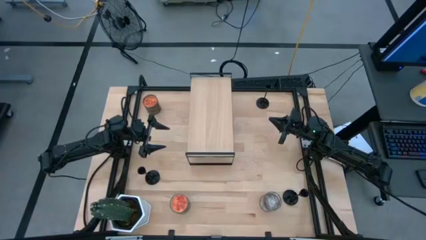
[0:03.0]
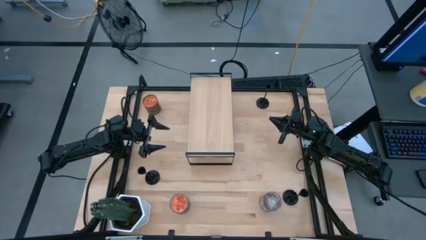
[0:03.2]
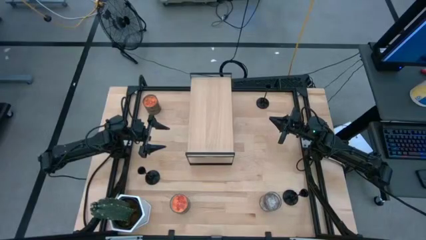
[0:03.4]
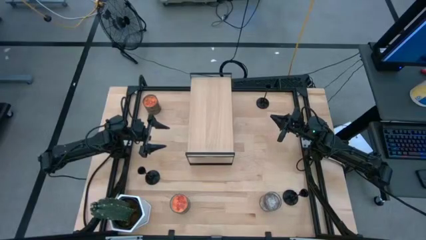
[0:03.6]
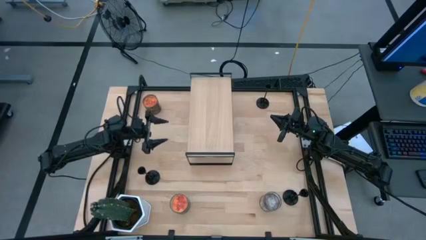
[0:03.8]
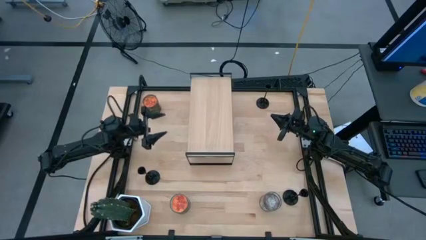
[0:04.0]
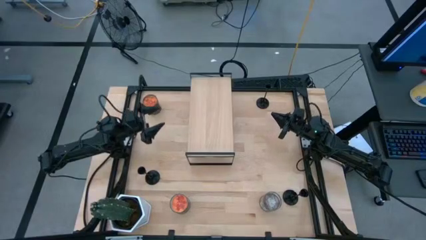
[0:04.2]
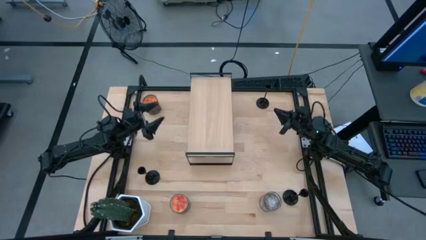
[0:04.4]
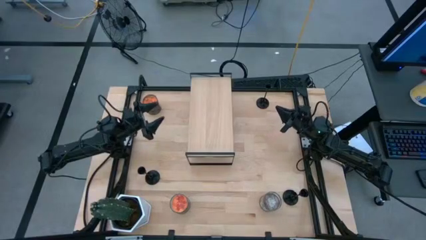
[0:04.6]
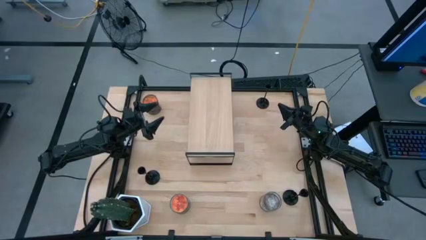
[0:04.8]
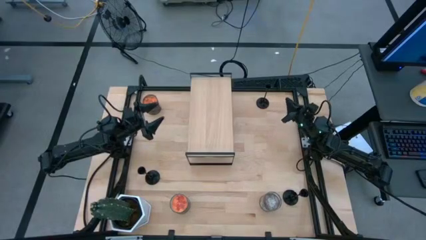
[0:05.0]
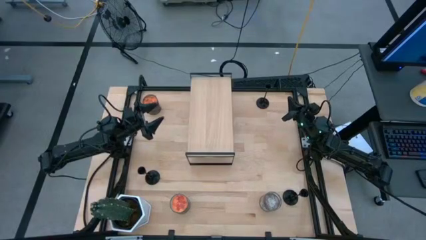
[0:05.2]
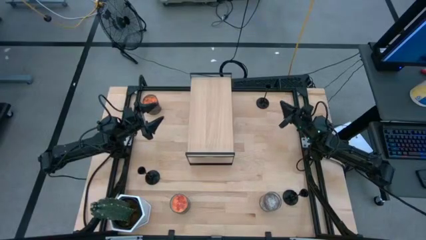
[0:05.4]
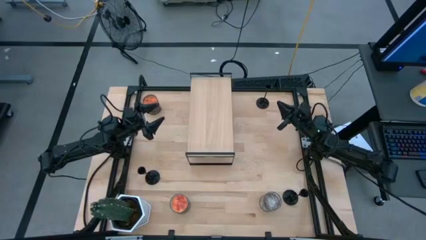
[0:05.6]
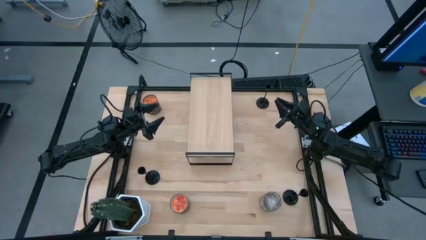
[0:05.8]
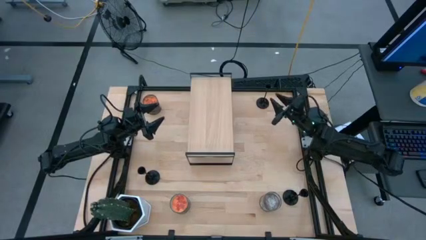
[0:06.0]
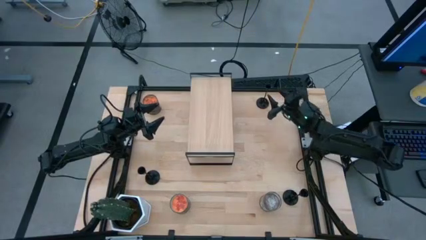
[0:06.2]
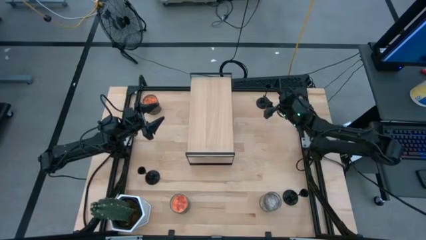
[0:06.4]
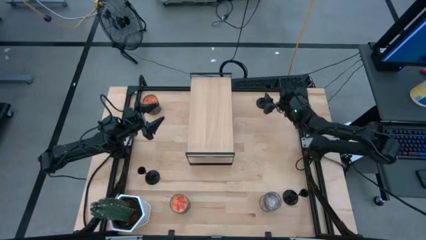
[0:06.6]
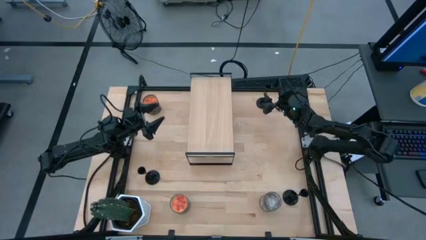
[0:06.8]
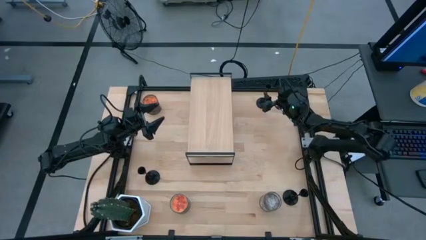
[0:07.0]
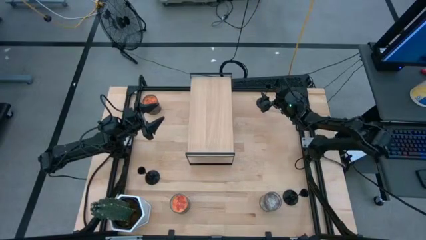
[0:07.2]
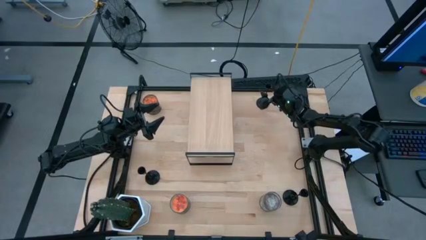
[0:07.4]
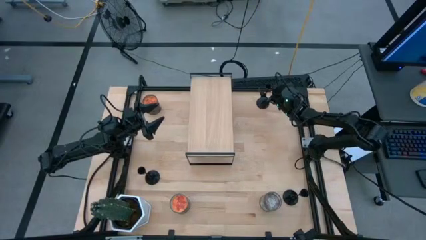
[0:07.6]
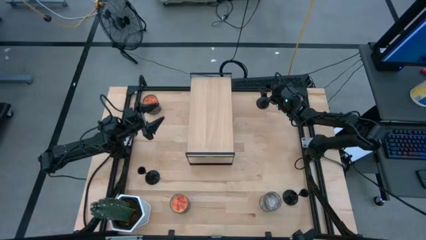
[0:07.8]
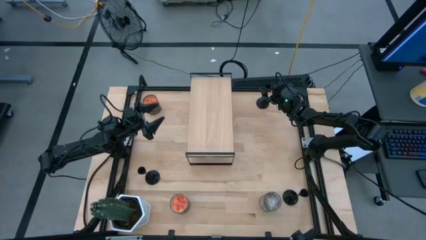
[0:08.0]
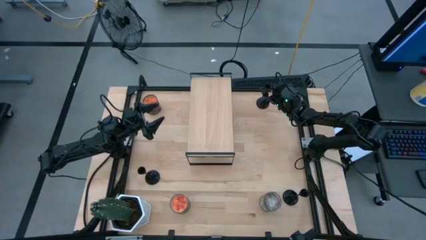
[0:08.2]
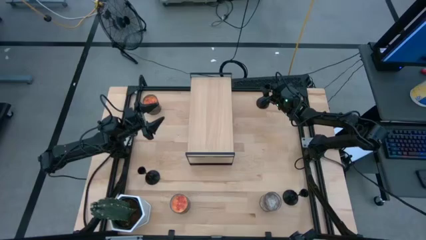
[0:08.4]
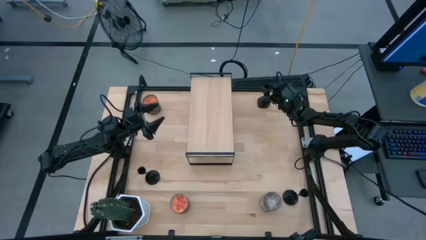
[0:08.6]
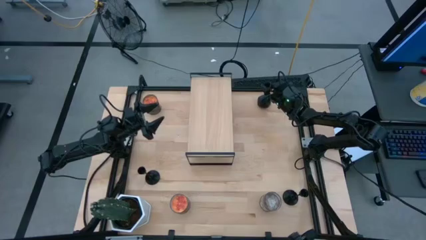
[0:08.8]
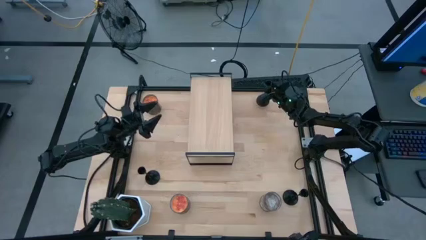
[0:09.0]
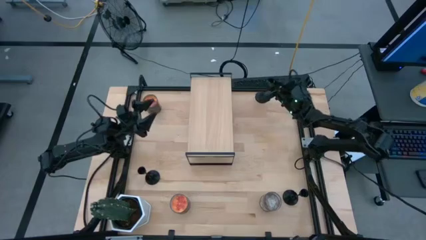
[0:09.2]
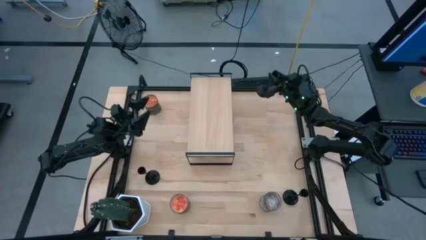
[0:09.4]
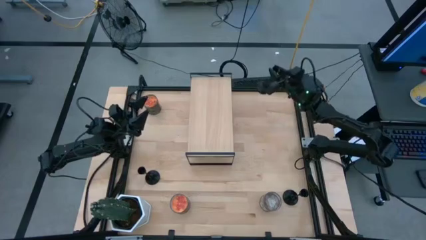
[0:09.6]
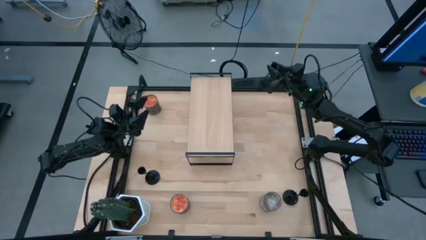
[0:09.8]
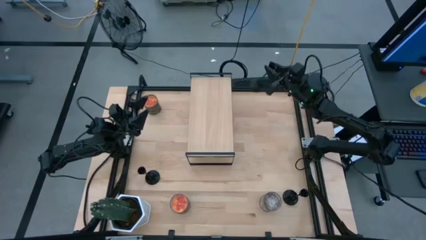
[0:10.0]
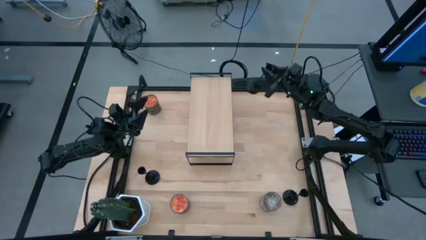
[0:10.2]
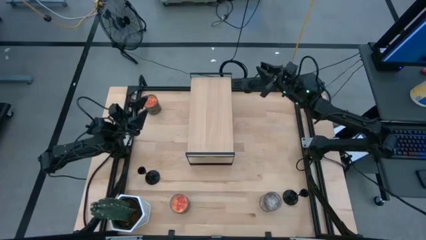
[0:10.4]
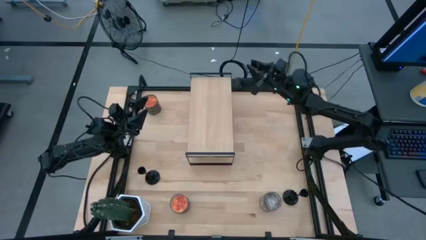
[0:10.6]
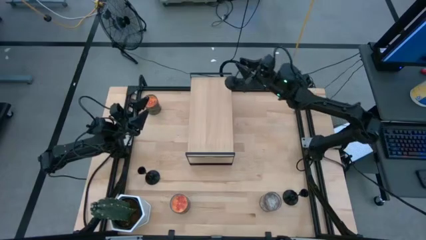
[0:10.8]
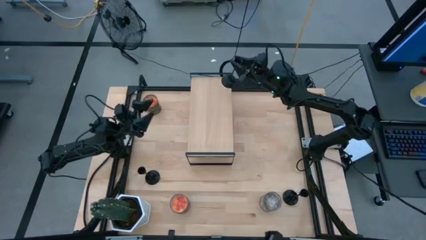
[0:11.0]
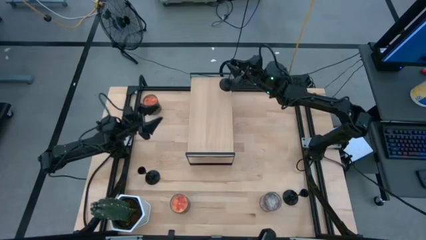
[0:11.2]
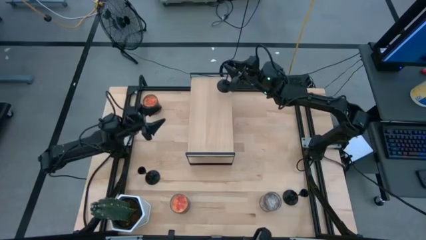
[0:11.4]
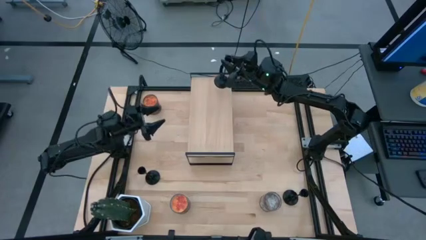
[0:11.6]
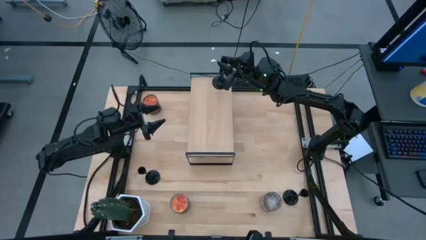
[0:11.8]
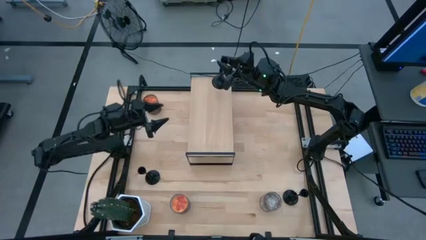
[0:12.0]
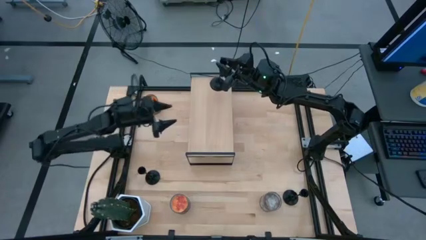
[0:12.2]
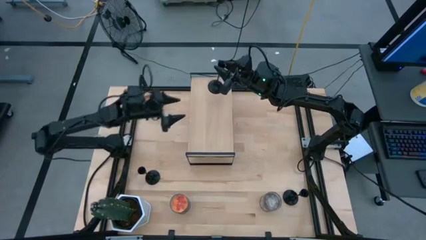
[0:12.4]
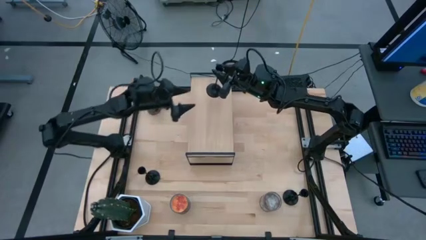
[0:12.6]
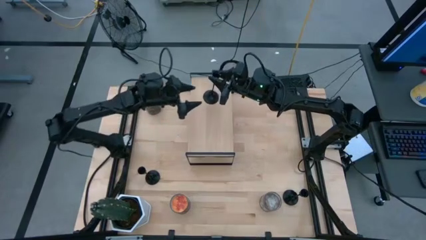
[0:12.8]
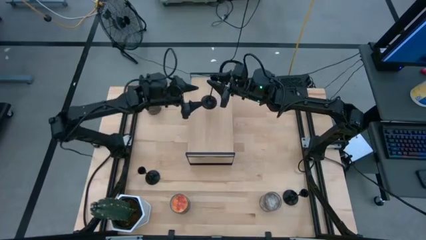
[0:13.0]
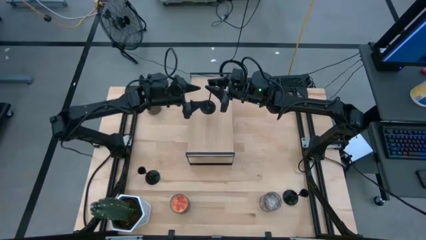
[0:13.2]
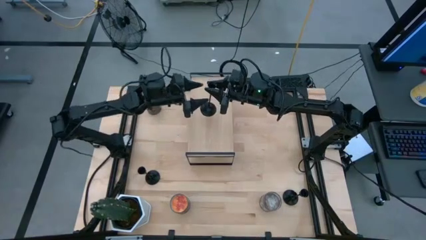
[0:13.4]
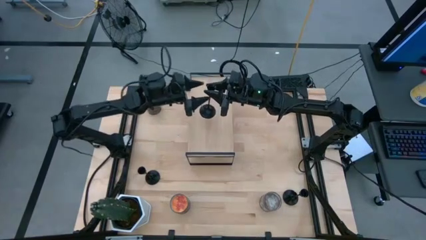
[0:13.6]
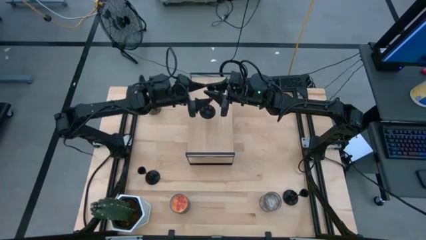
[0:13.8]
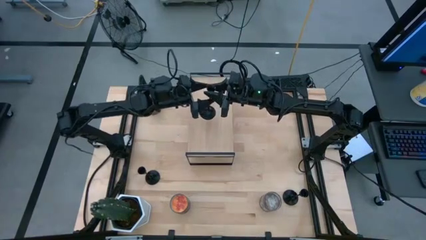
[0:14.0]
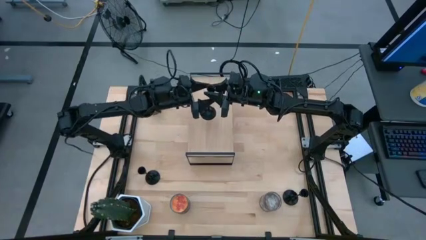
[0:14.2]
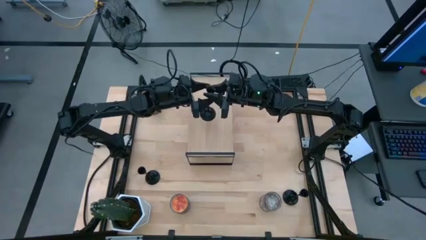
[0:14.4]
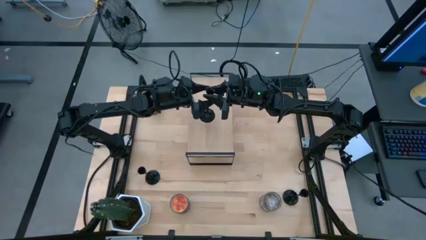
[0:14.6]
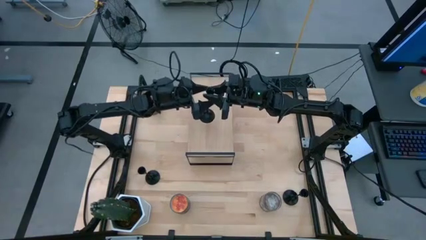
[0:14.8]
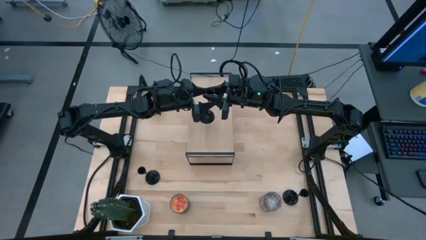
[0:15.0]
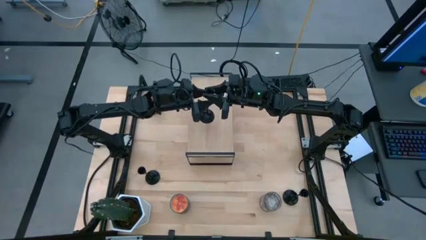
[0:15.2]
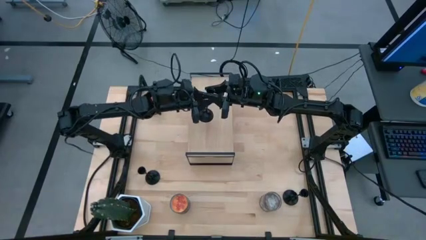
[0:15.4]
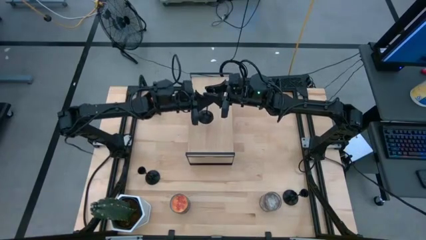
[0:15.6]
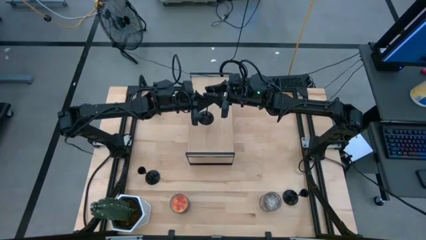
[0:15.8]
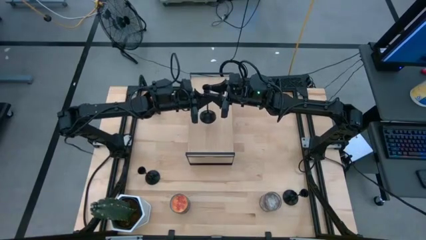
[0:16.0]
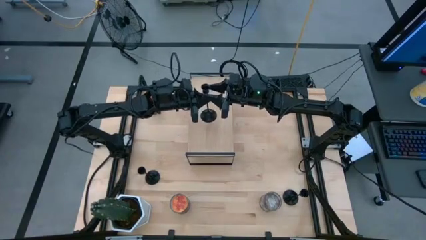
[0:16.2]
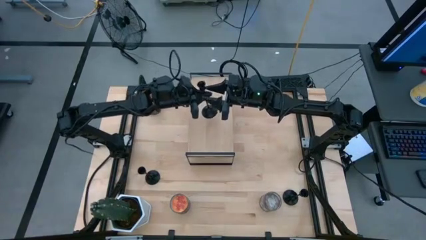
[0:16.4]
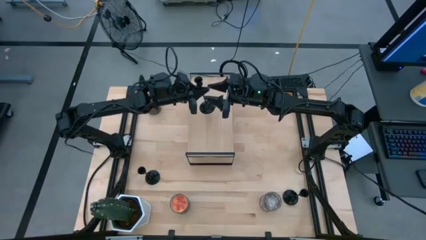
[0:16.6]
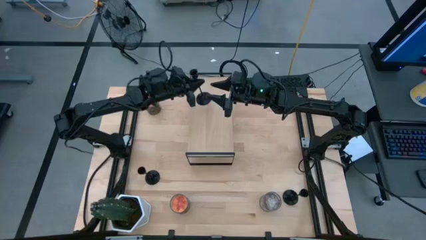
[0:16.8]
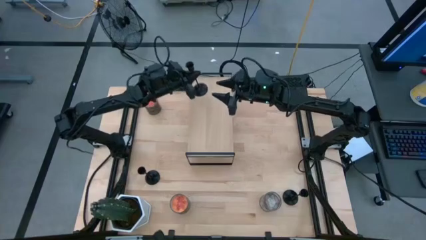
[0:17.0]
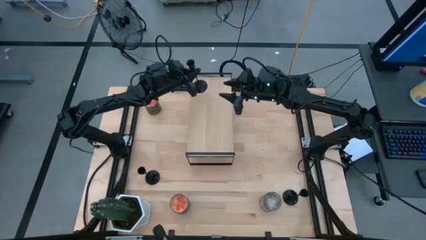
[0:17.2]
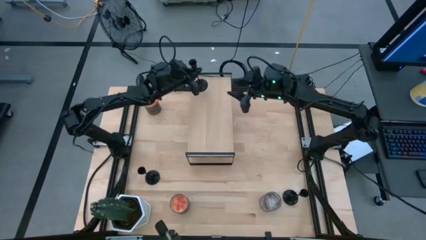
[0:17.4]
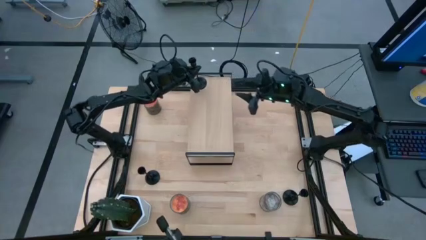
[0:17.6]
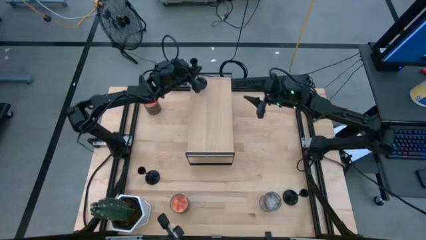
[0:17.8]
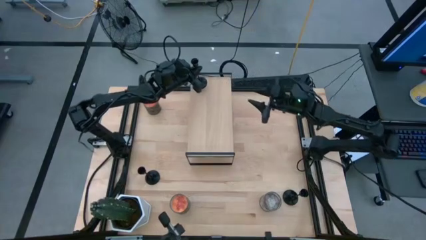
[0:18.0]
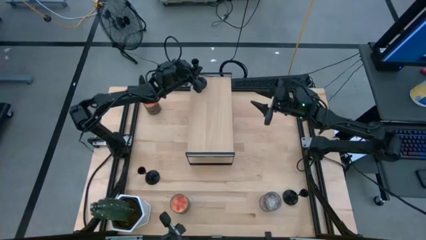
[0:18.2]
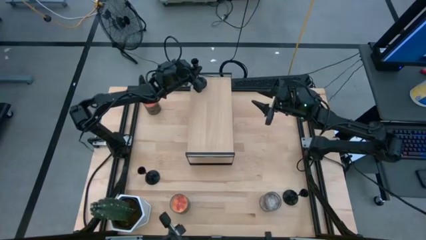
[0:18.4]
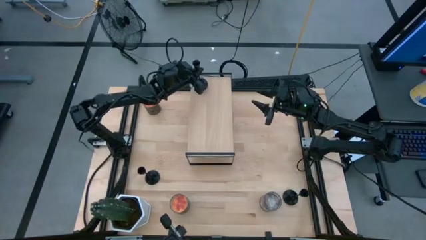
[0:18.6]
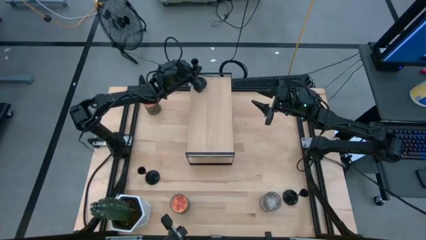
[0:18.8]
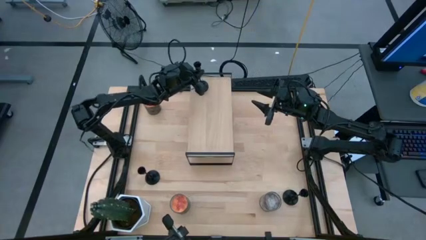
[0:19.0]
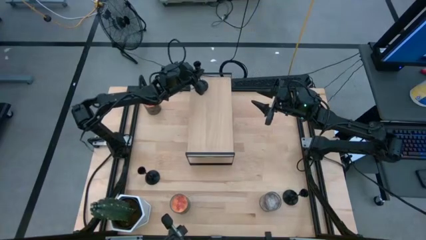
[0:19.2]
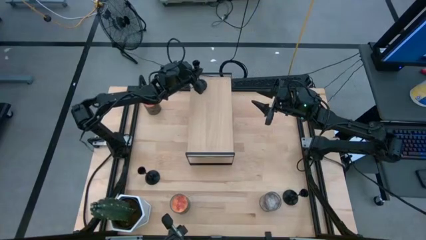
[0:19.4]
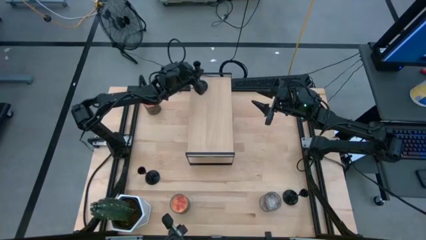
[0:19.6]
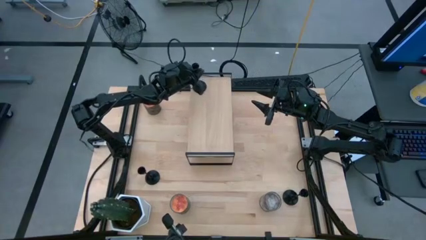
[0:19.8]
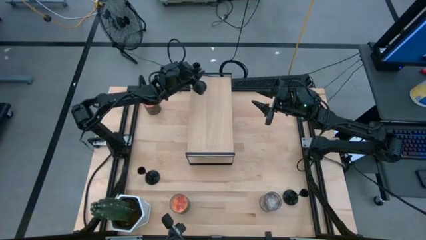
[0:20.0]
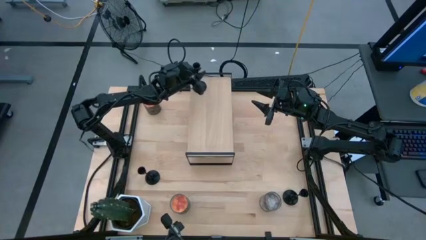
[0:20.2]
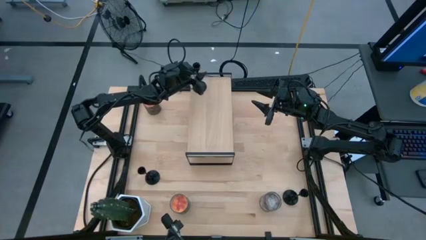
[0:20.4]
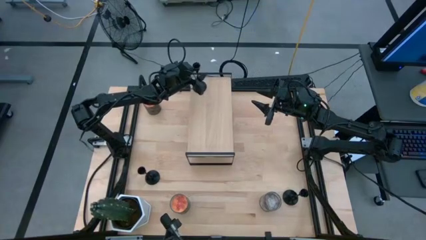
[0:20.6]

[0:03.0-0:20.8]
Task: Pick & Place candle stick holders
Put the top black candle holder on the shelf
